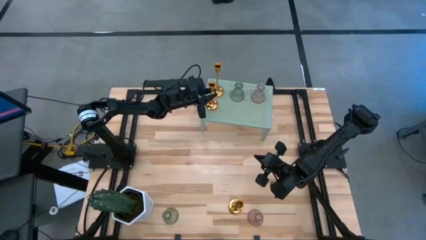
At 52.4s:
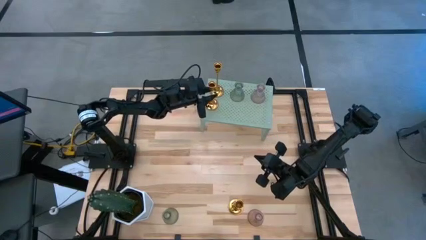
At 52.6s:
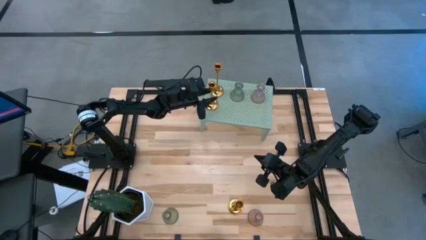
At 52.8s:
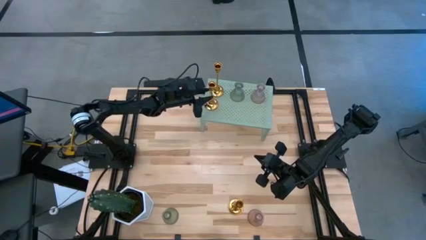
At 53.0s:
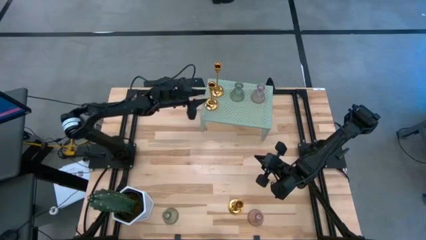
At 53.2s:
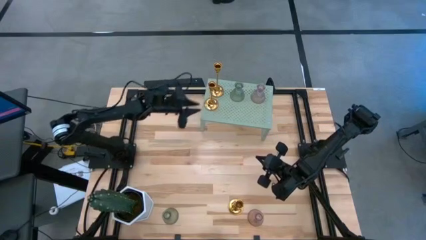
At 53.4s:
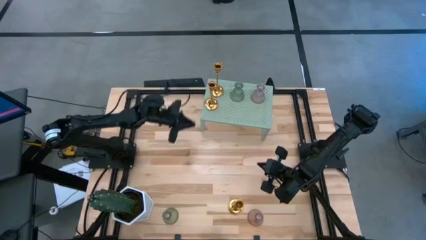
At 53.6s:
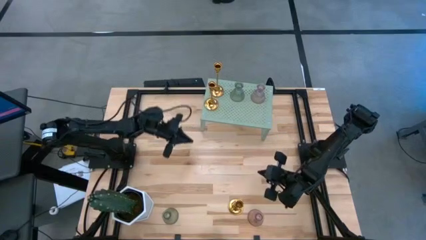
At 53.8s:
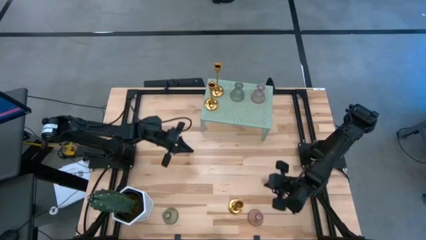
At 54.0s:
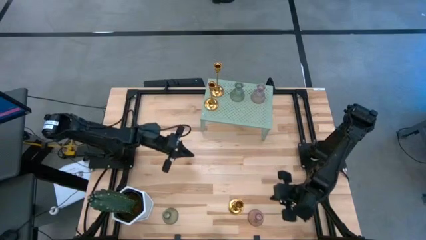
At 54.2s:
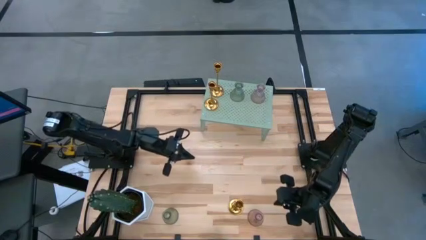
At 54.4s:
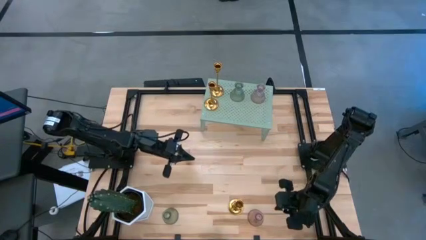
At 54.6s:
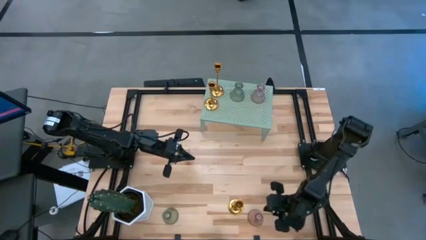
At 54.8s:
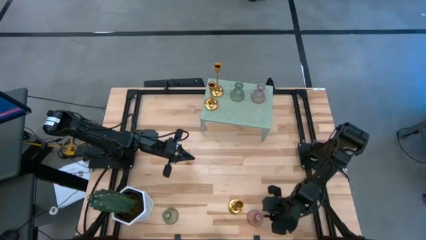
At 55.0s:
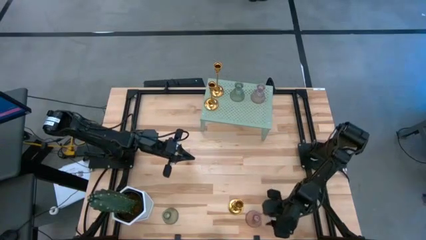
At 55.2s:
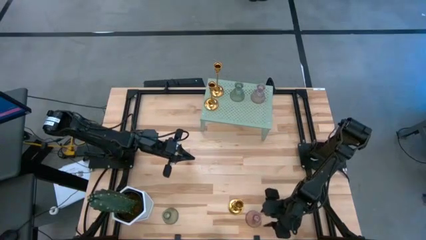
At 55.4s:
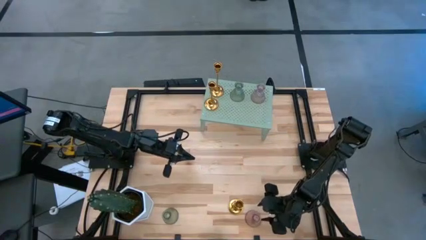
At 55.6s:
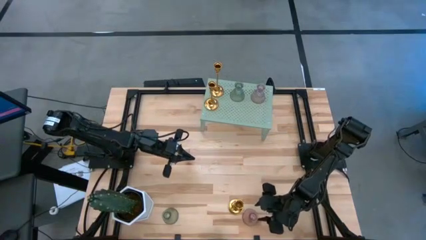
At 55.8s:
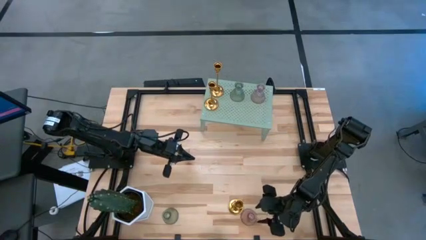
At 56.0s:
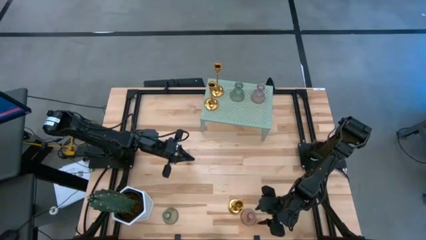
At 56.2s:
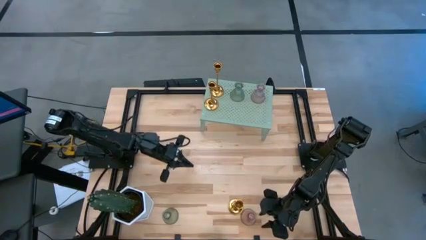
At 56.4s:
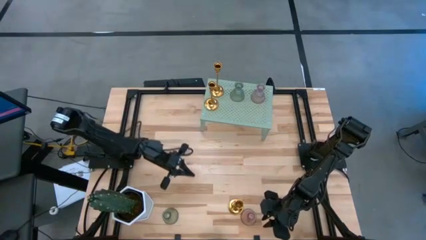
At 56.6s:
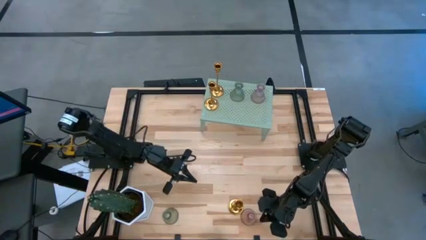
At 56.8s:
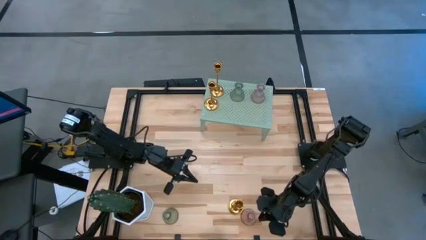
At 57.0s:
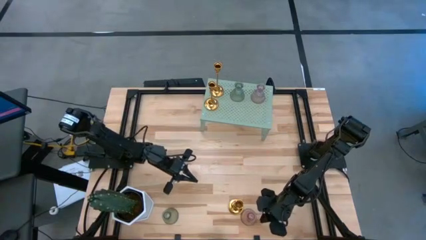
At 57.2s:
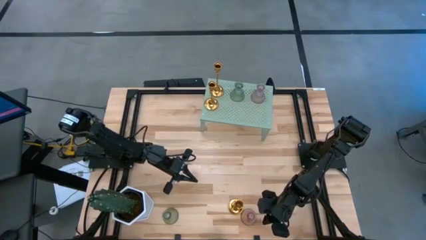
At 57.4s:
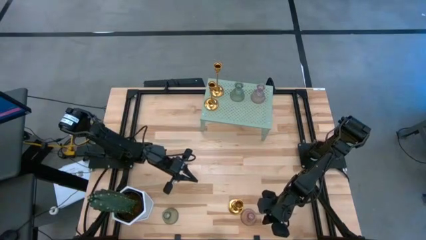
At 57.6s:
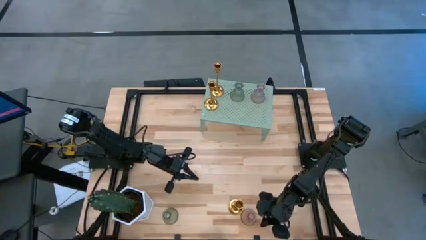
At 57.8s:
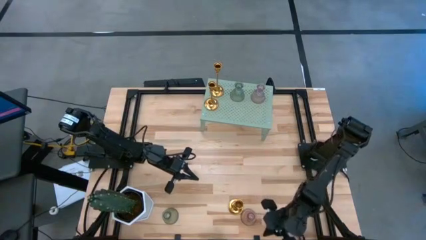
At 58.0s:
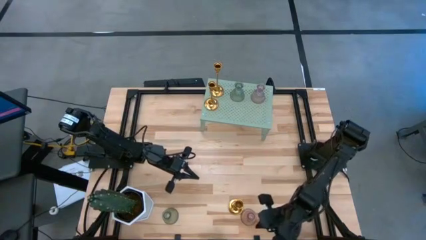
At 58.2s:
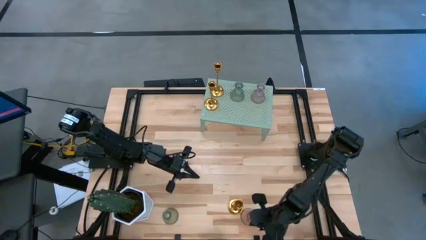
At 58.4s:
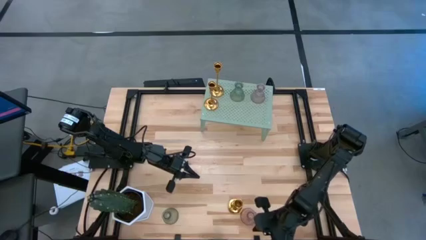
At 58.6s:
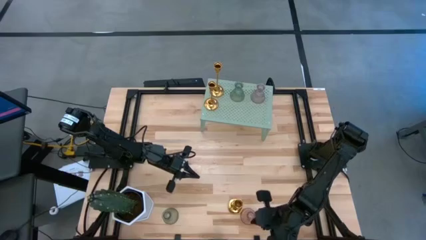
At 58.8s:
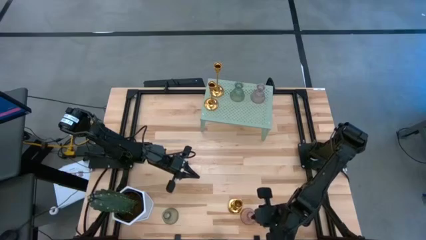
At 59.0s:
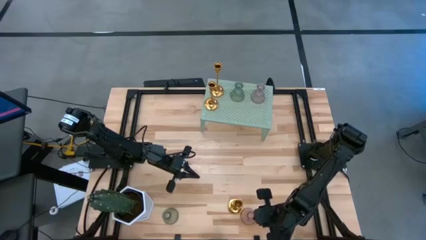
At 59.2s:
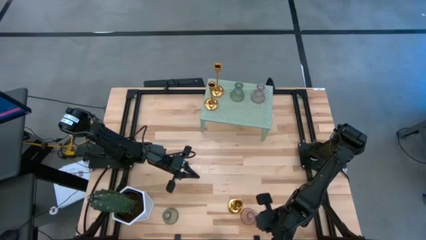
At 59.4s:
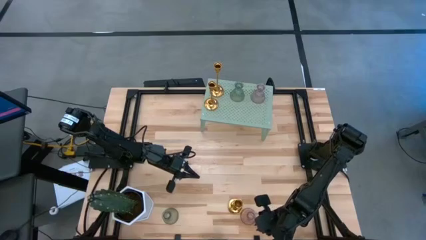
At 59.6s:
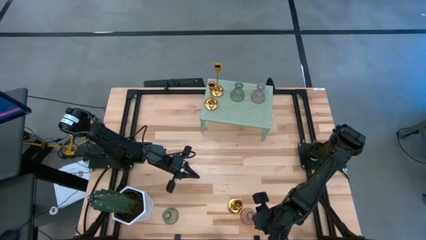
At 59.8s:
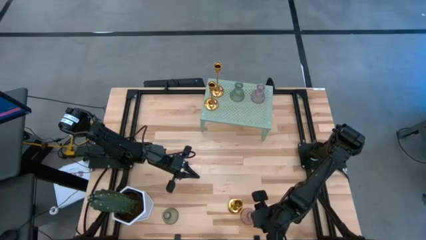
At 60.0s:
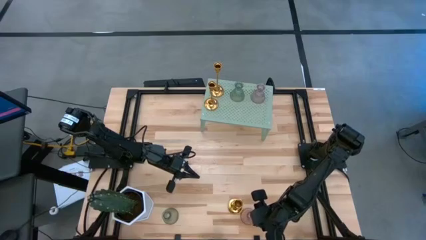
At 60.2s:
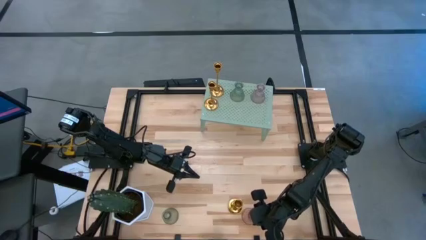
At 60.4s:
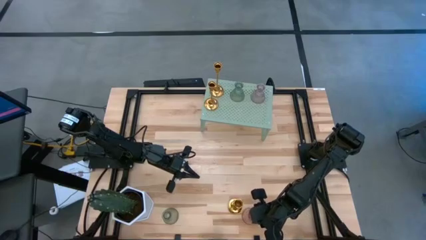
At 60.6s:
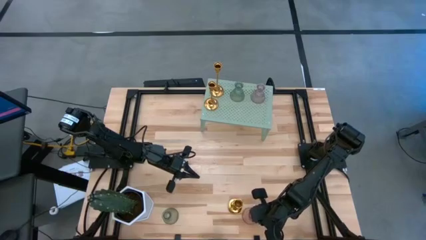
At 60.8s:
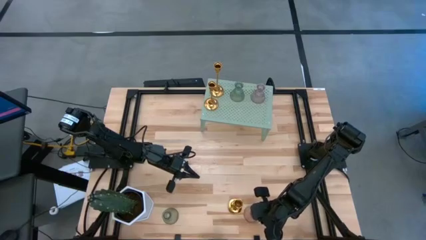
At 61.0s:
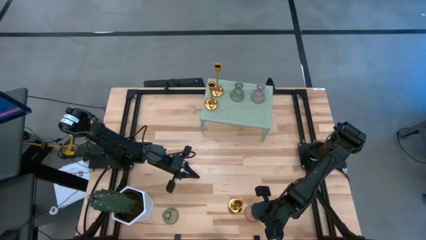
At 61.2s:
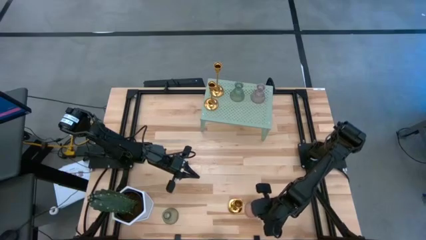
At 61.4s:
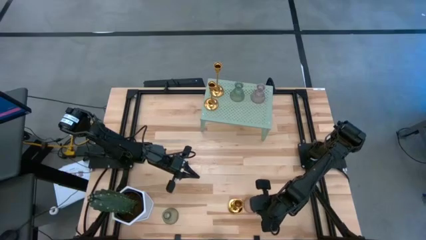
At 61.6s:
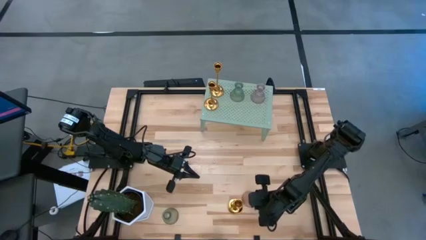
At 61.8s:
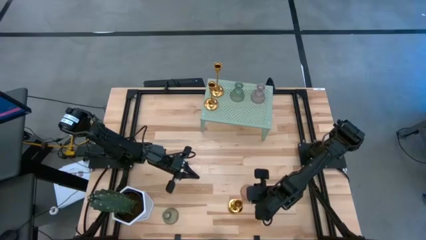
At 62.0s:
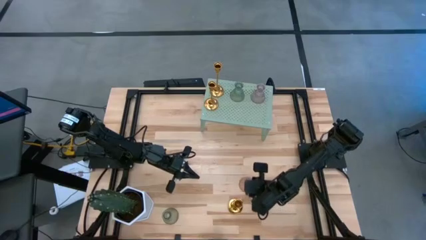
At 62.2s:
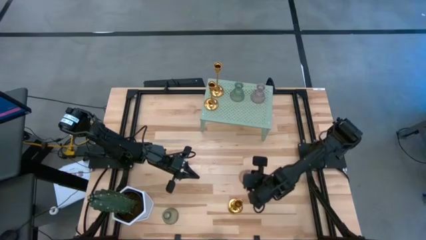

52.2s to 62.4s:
Task: Pick & Place candle stick holders
Put the purple glass candle holder on the shelf aligned with the other purple candle holder
